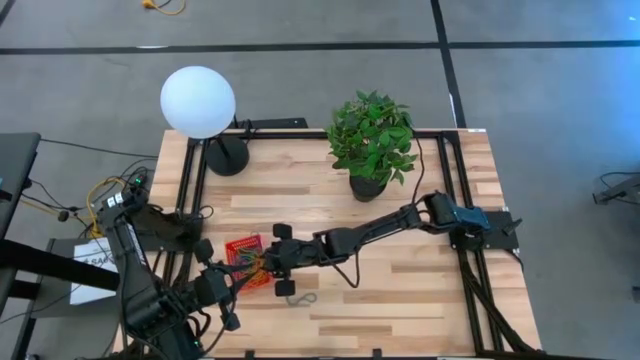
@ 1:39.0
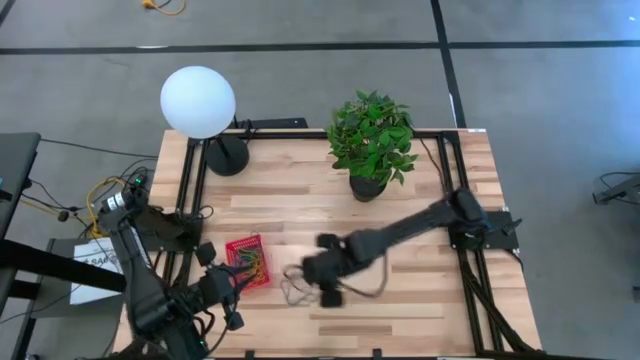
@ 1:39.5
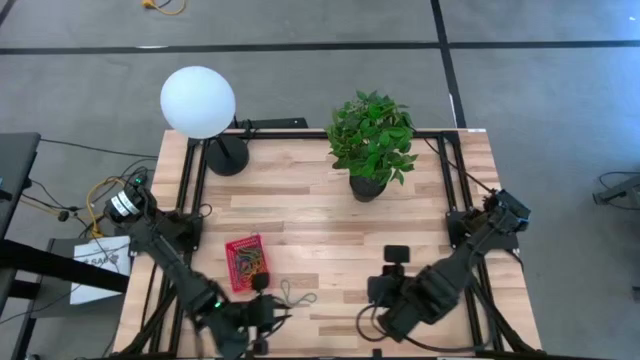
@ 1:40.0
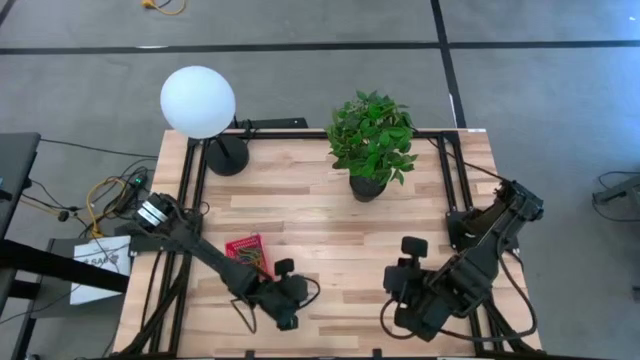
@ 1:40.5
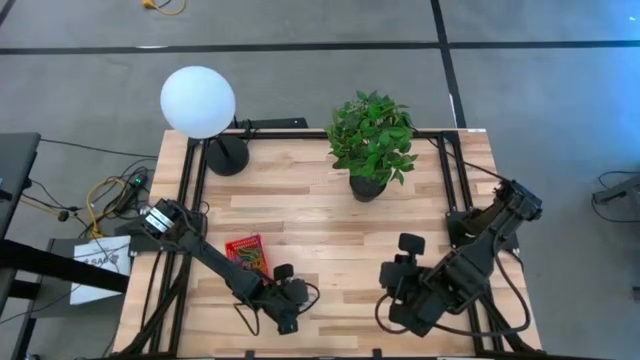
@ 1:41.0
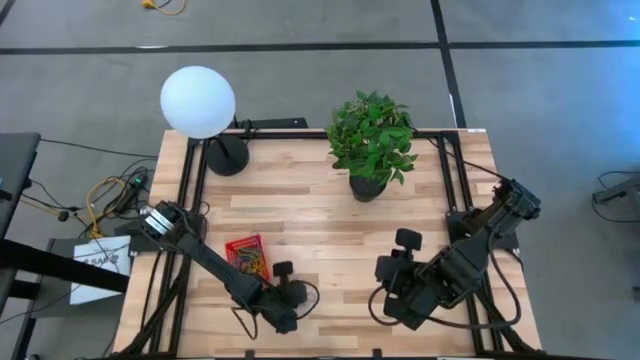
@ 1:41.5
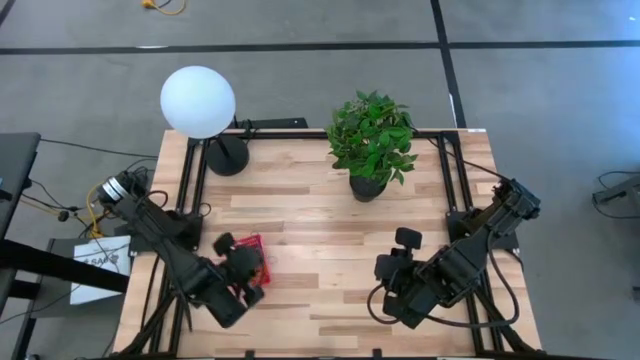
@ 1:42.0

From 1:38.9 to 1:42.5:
Task: Pick and place items into bin
Put the blue rubber band into the red bin

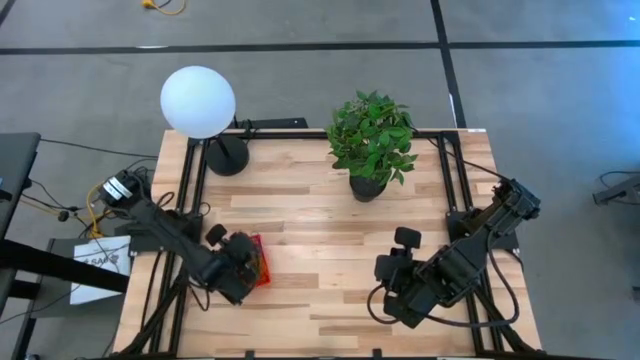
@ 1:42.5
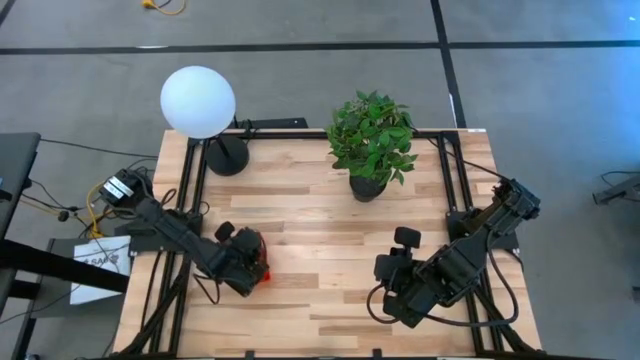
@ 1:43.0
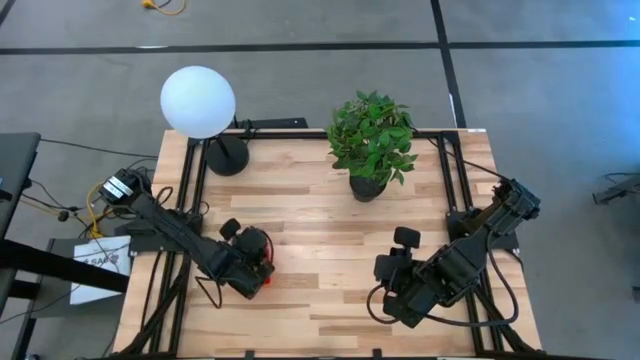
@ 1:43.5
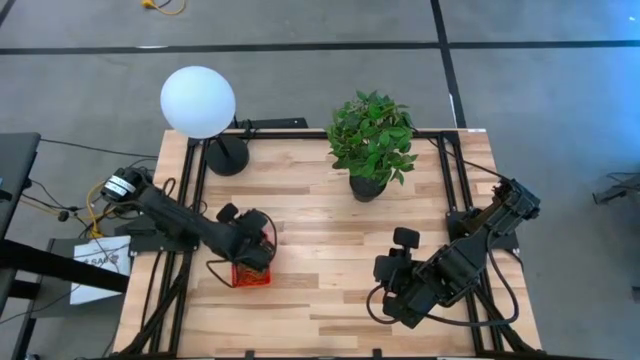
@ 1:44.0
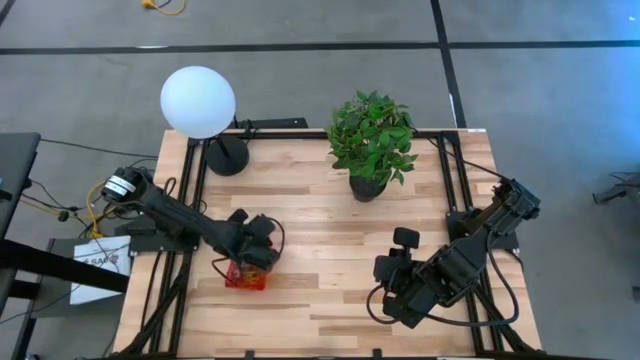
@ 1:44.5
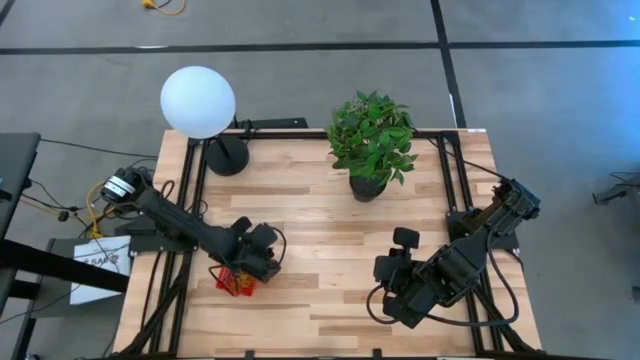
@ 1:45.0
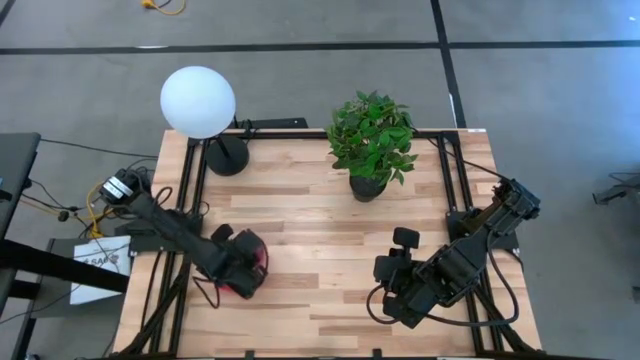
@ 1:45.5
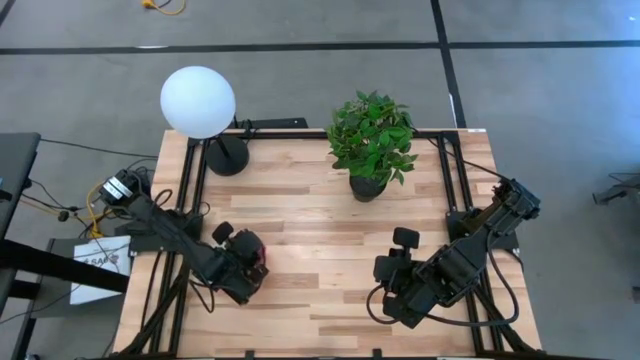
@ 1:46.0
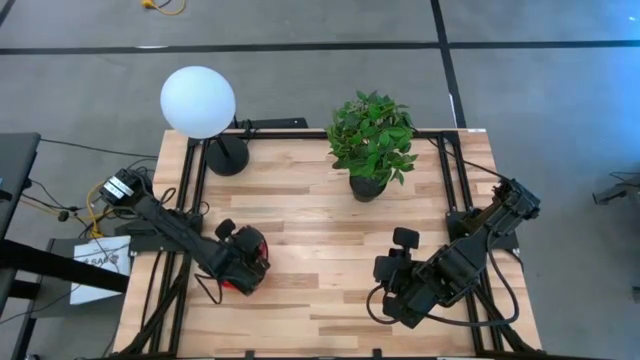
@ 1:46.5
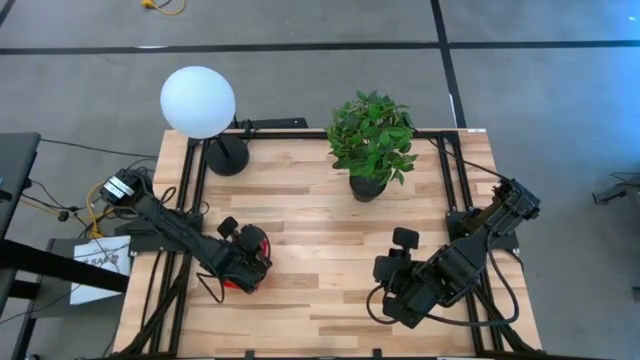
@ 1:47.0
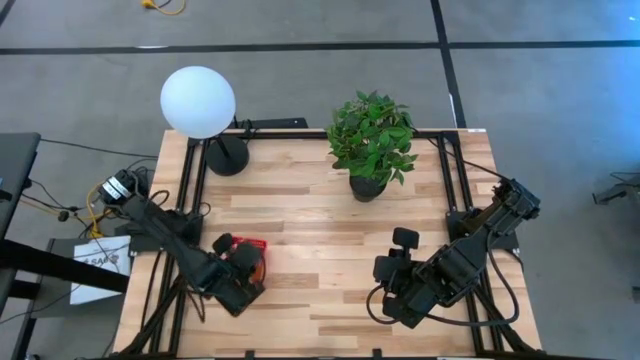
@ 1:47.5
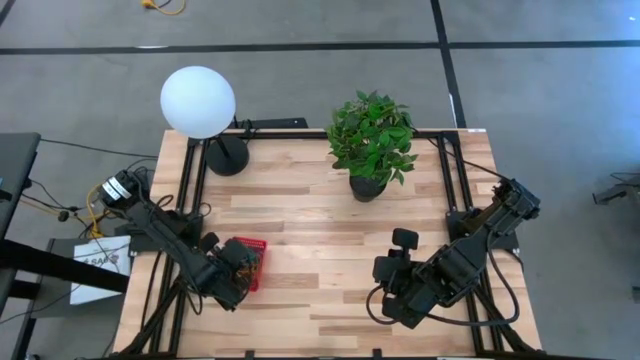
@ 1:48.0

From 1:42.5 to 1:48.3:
Adjust the blue rubber band in the red bin

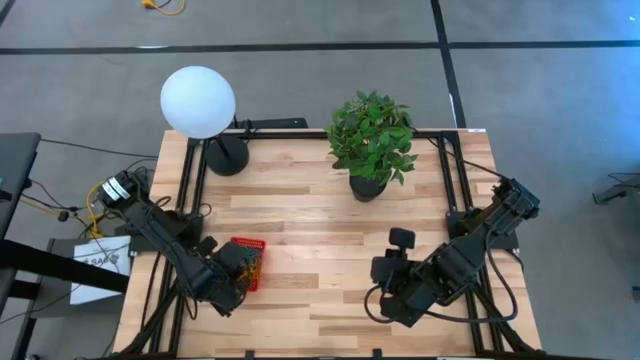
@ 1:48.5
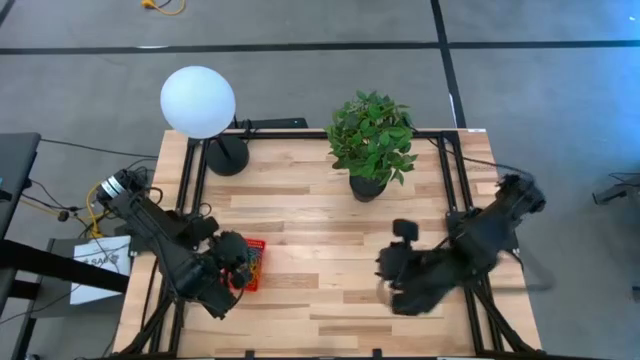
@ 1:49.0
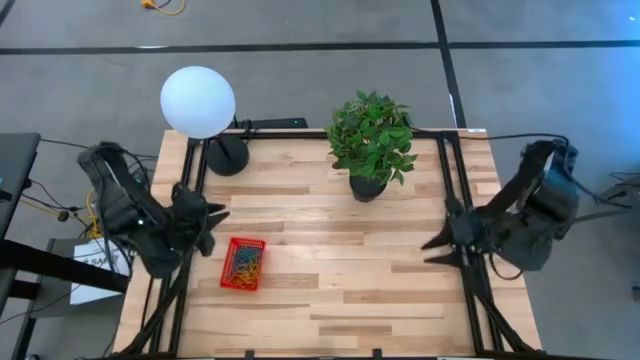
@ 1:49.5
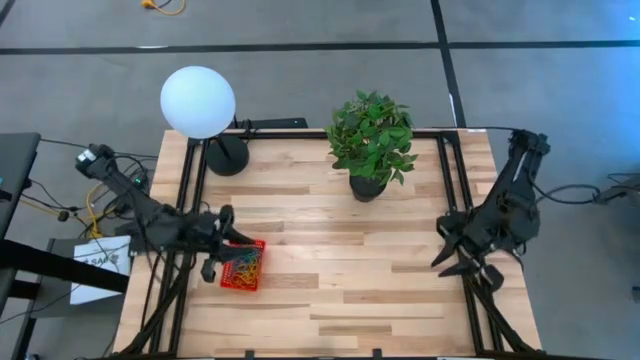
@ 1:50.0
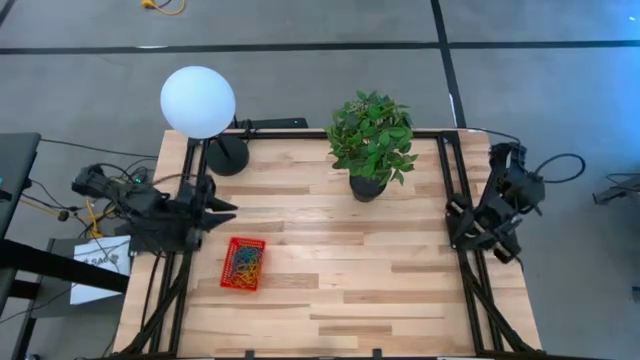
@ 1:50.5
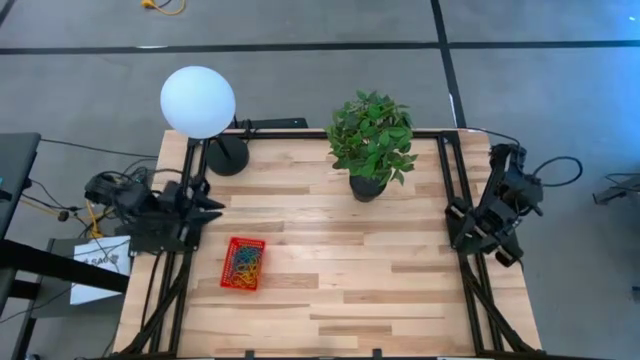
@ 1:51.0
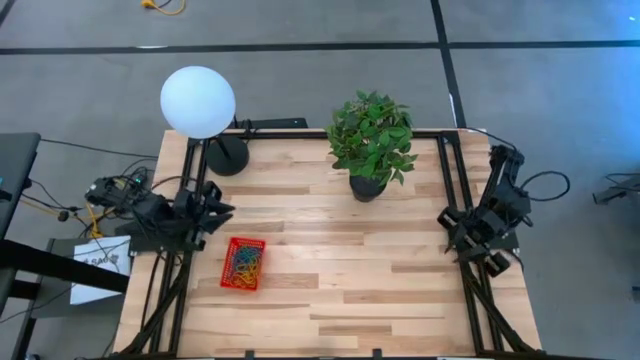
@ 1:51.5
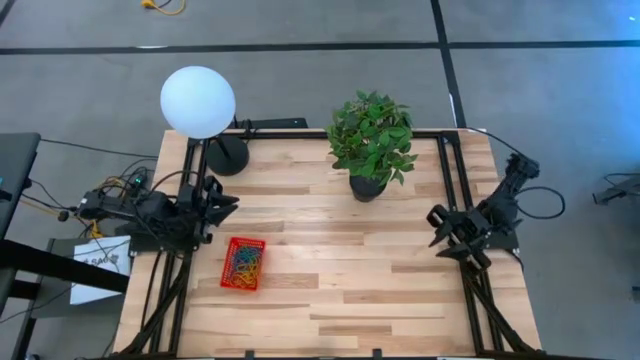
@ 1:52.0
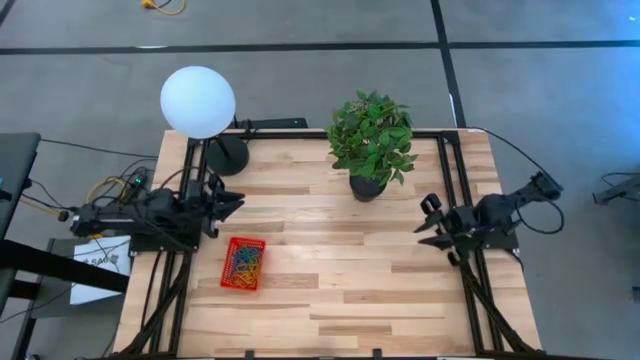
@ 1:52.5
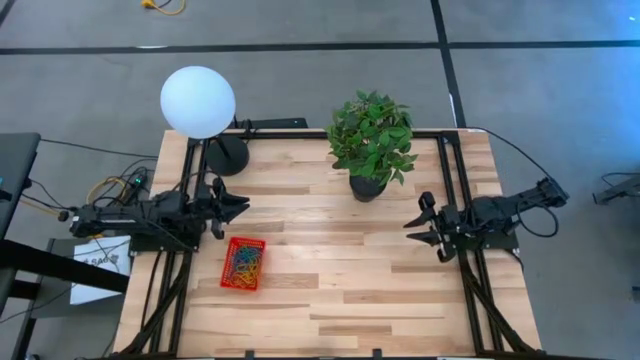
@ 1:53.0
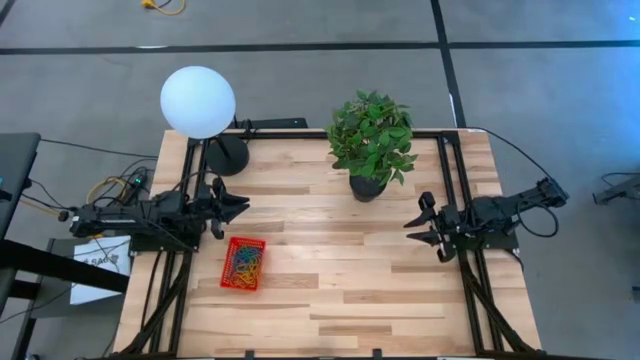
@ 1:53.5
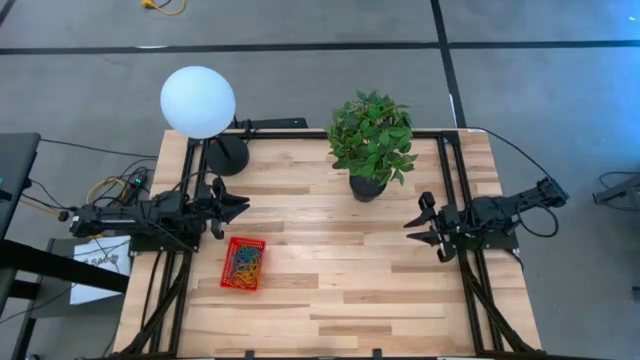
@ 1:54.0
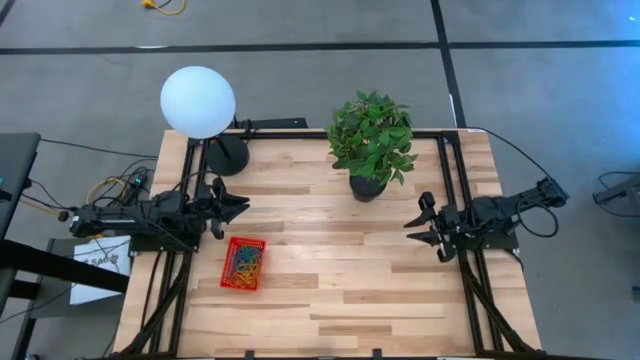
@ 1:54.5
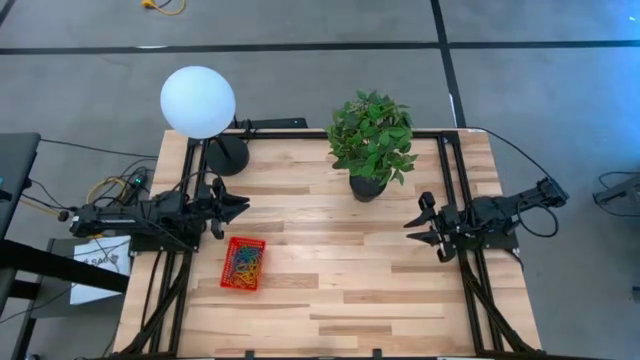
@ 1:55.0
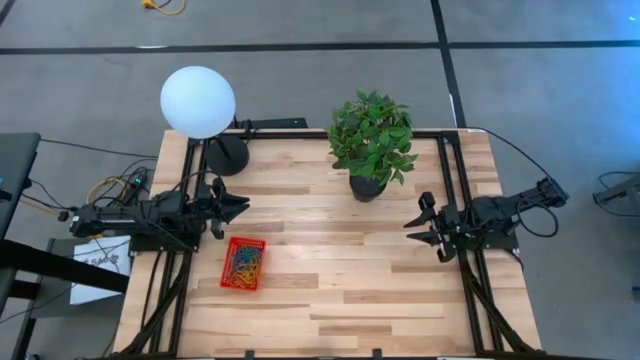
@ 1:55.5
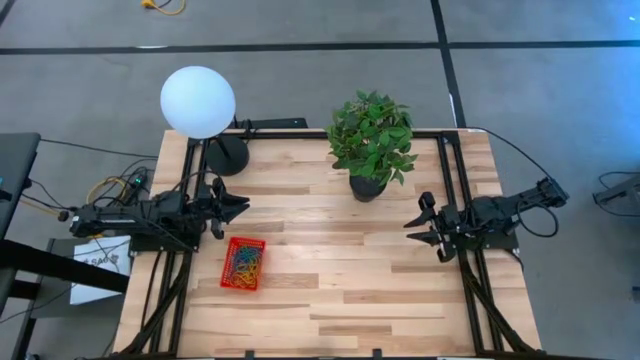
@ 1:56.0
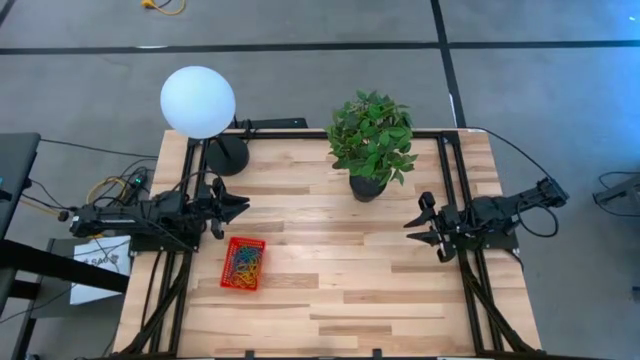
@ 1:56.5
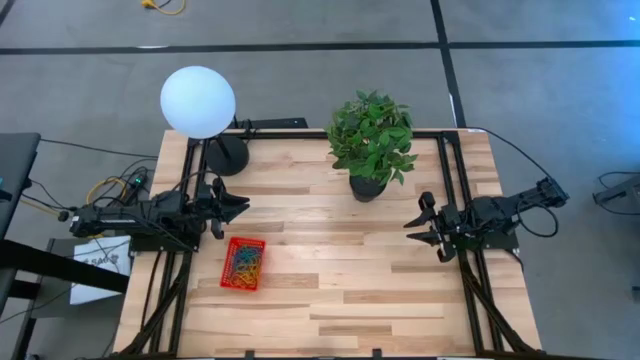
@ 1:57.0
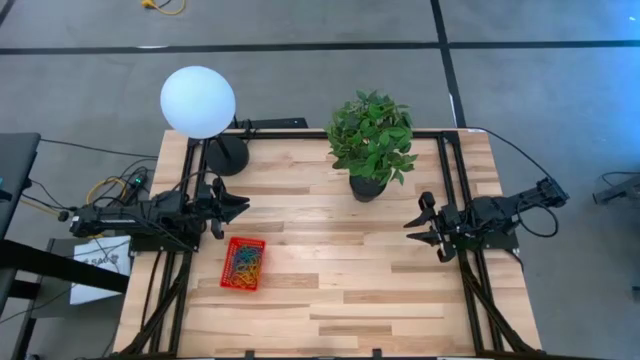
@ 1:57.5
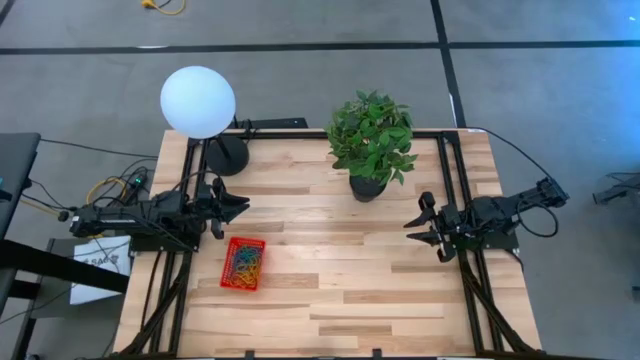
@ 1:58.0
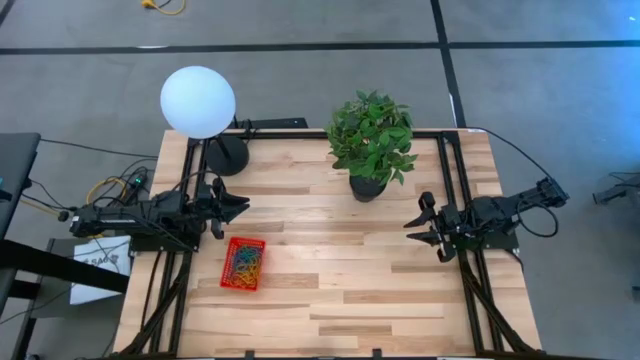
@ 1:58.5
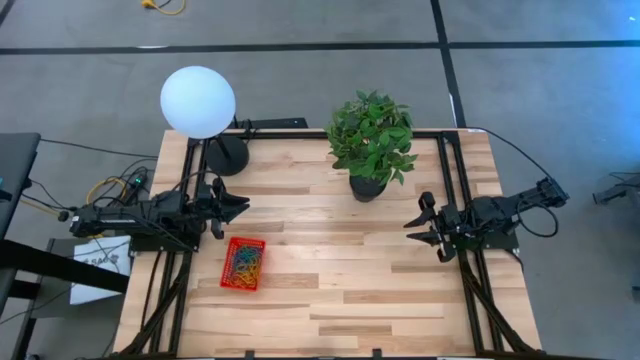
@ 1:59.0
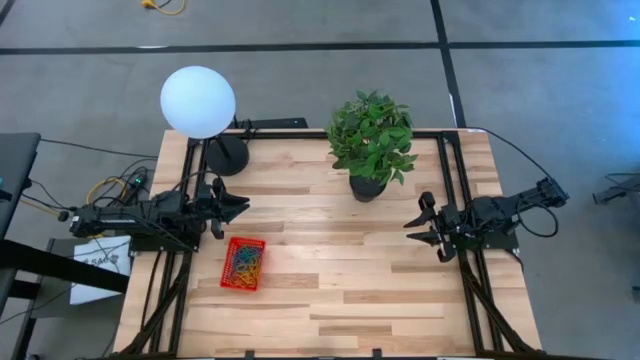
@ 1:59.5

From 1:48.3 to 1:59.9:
Return to Home Position
